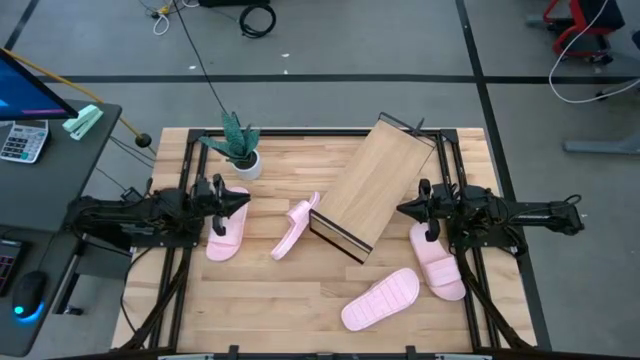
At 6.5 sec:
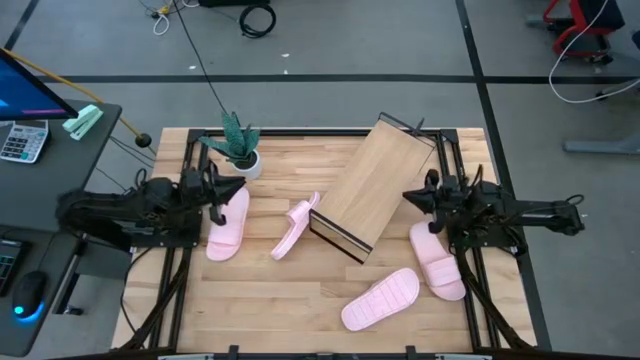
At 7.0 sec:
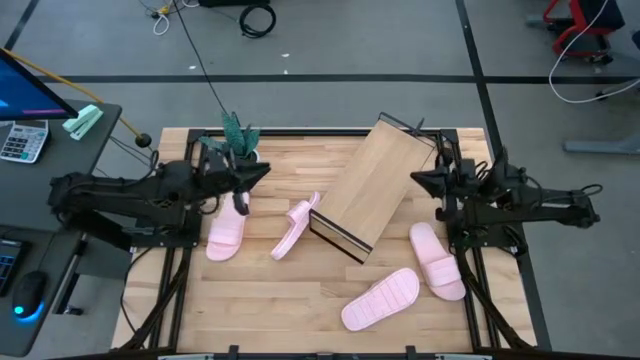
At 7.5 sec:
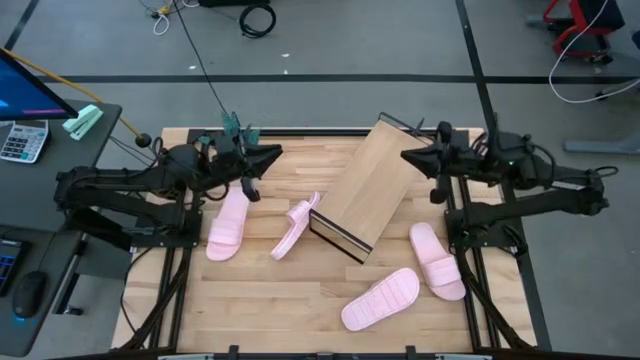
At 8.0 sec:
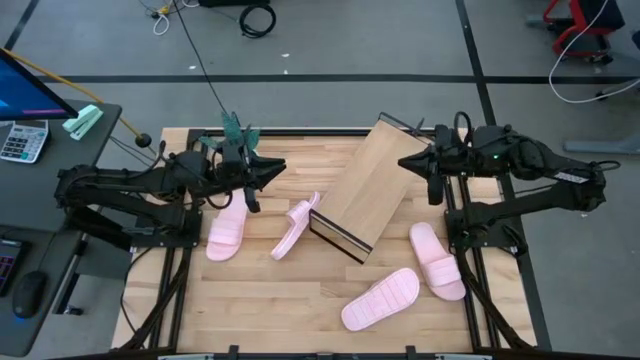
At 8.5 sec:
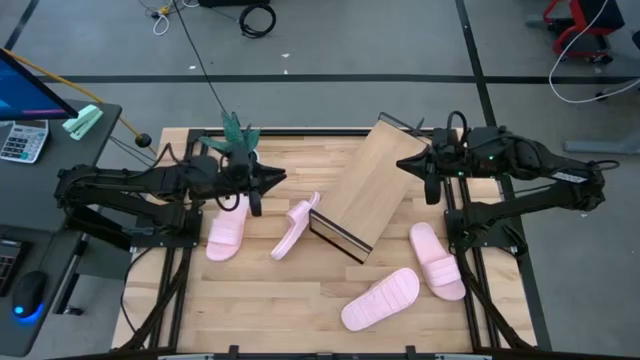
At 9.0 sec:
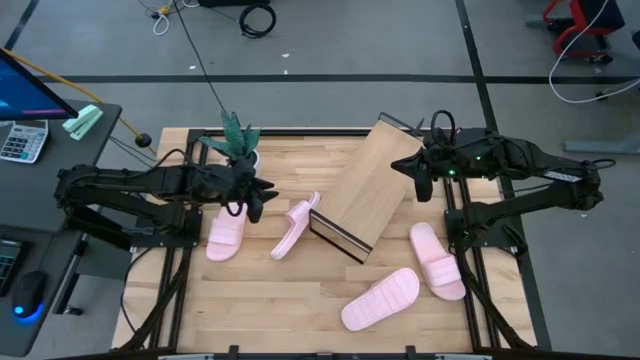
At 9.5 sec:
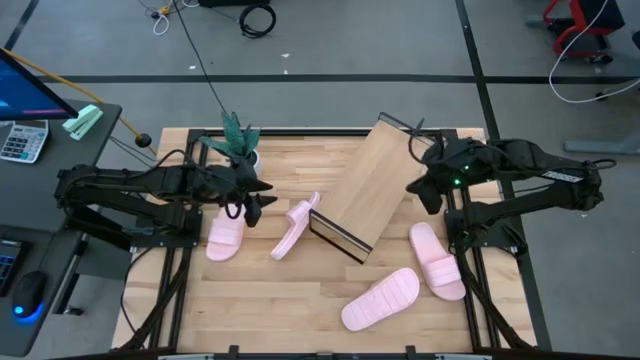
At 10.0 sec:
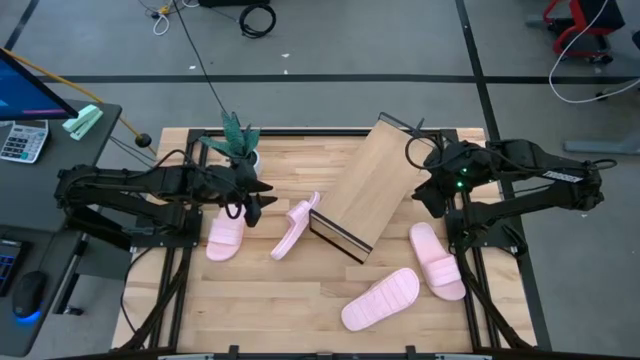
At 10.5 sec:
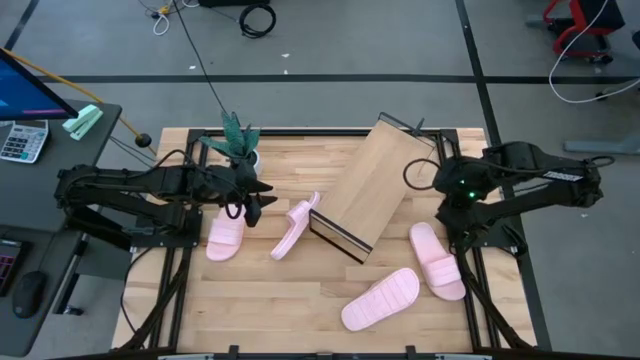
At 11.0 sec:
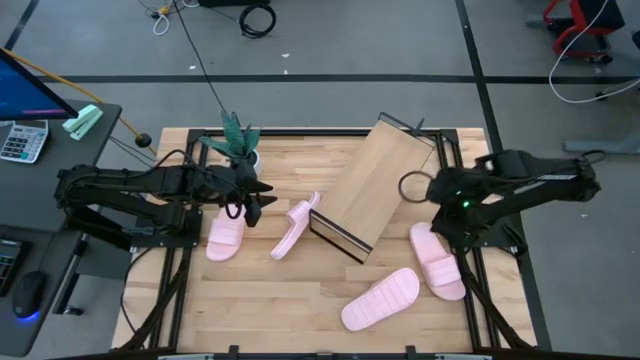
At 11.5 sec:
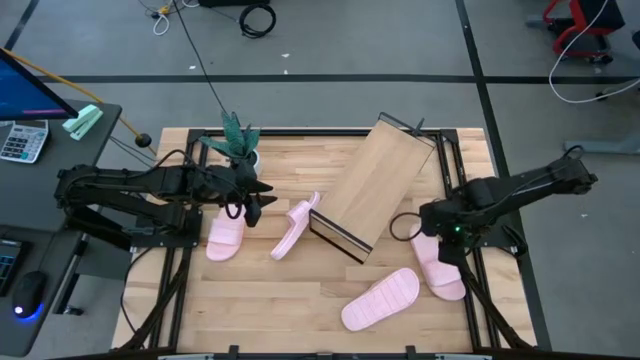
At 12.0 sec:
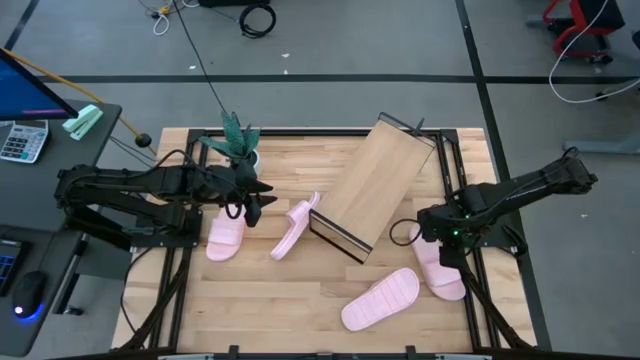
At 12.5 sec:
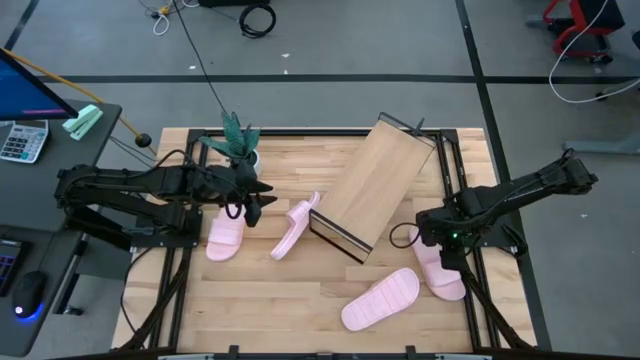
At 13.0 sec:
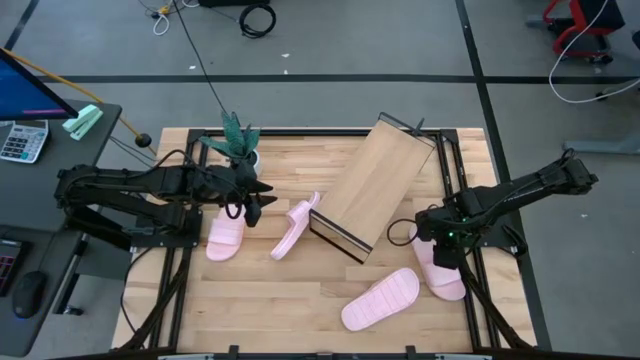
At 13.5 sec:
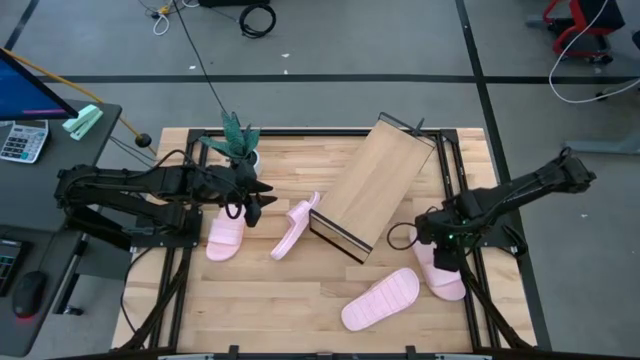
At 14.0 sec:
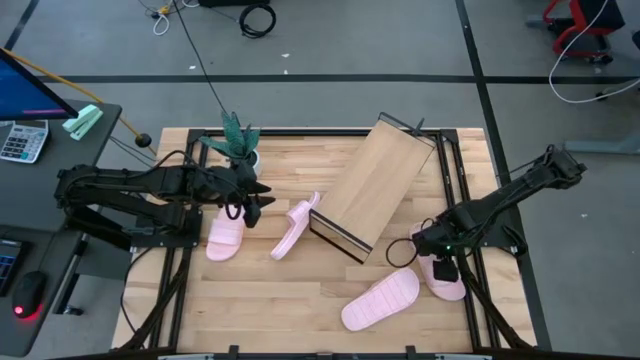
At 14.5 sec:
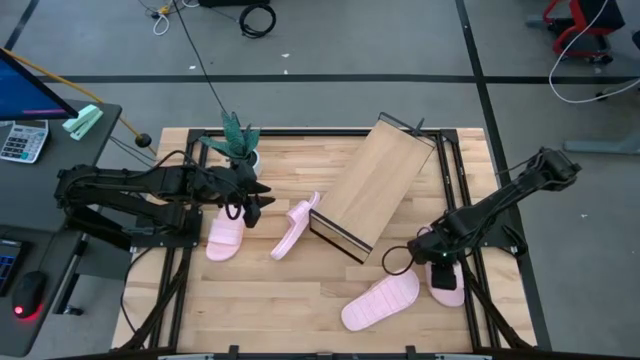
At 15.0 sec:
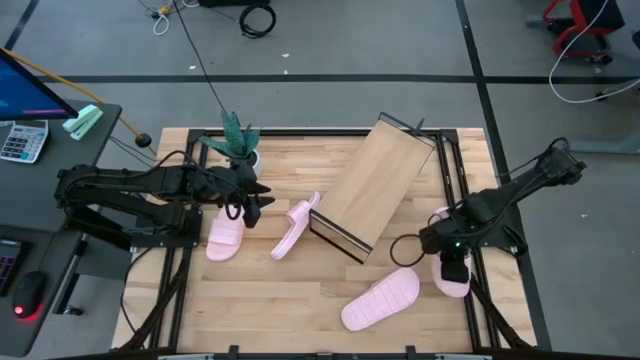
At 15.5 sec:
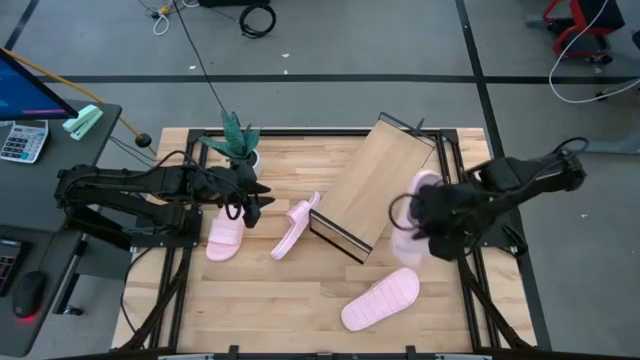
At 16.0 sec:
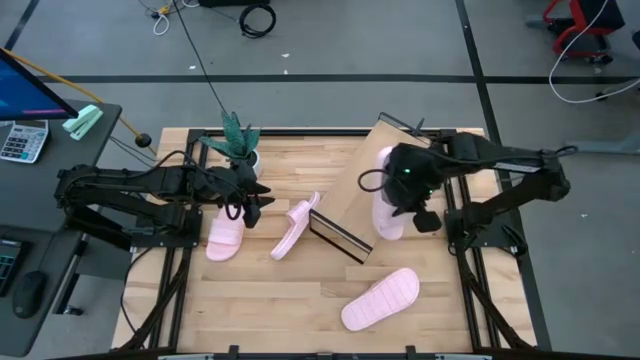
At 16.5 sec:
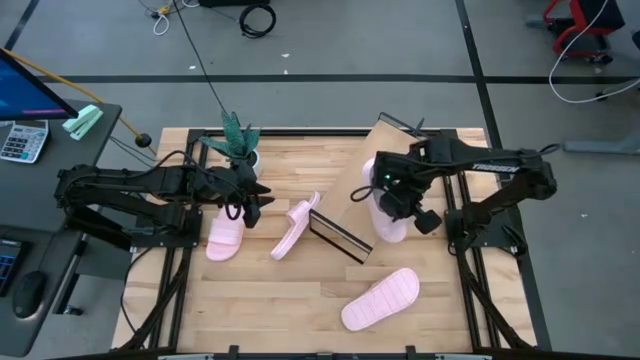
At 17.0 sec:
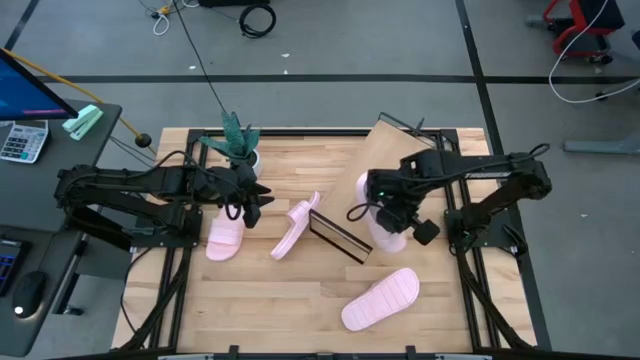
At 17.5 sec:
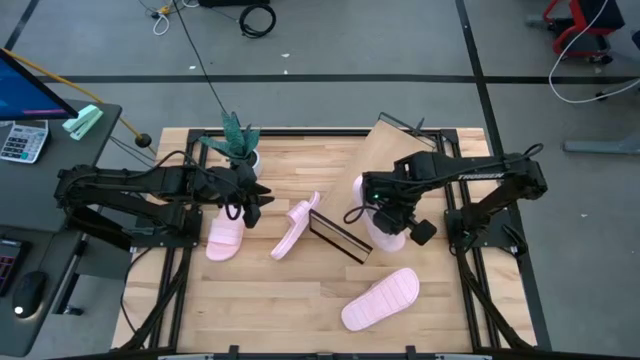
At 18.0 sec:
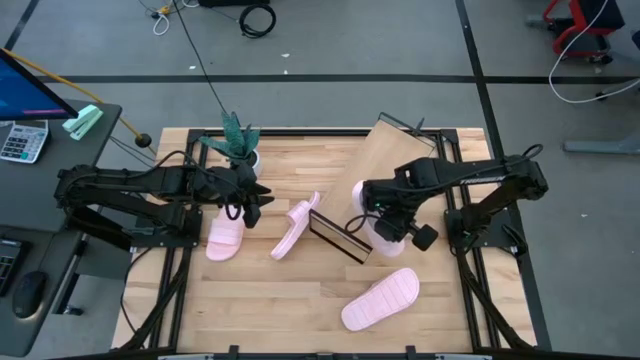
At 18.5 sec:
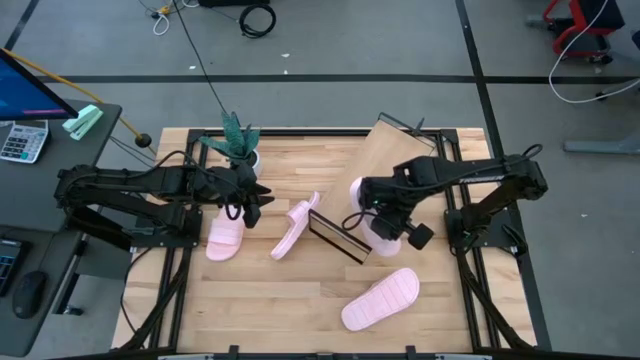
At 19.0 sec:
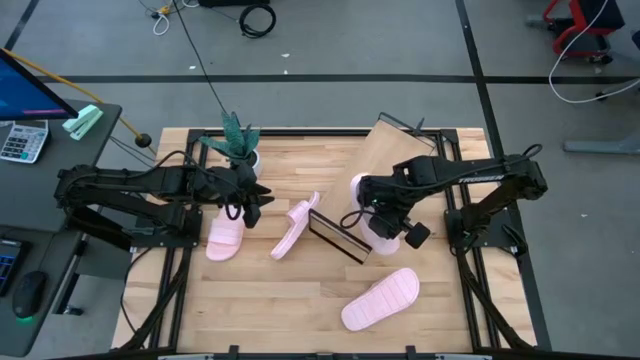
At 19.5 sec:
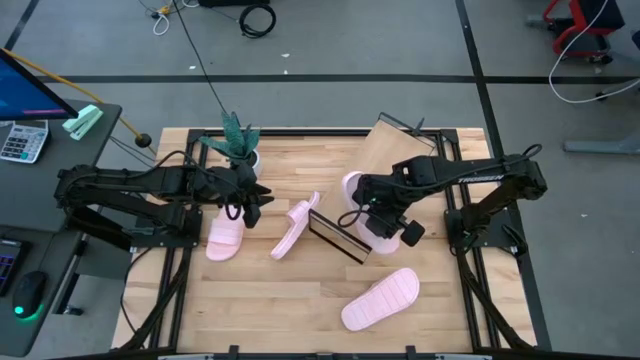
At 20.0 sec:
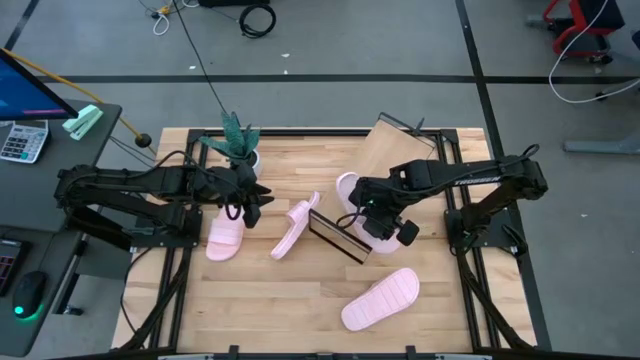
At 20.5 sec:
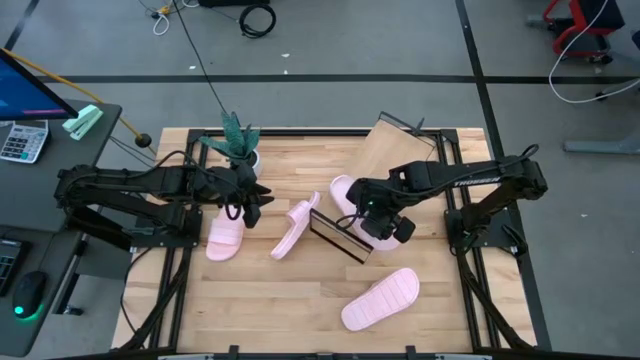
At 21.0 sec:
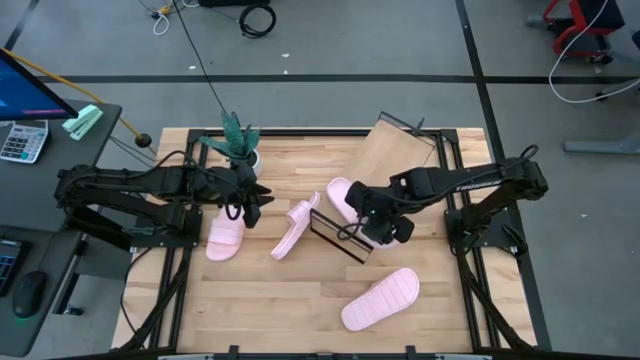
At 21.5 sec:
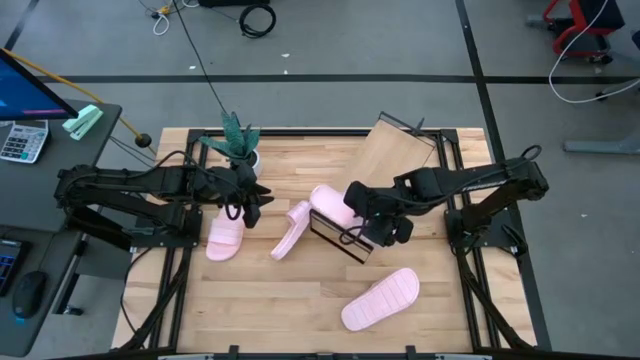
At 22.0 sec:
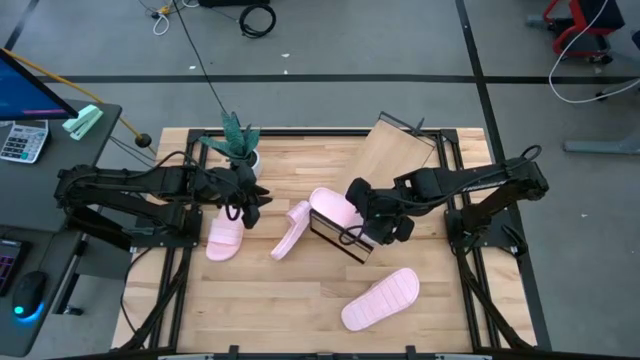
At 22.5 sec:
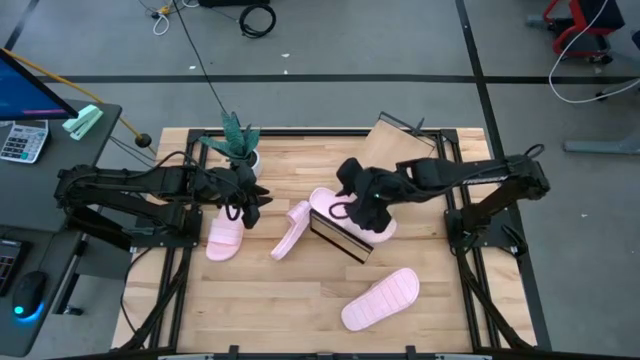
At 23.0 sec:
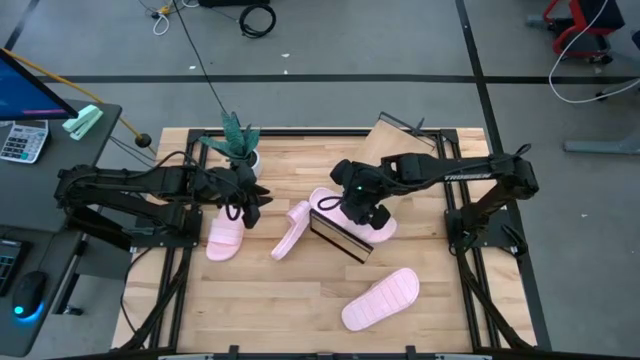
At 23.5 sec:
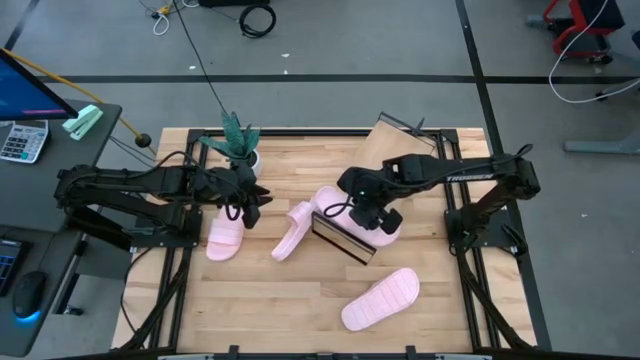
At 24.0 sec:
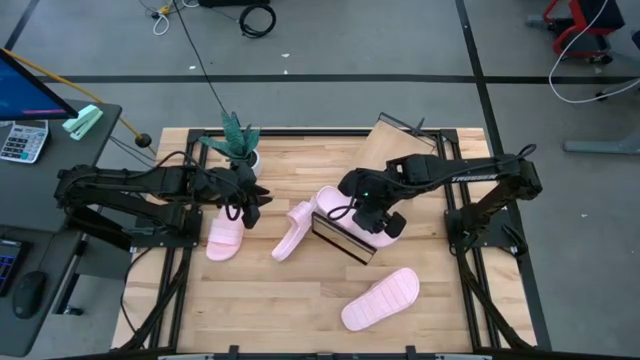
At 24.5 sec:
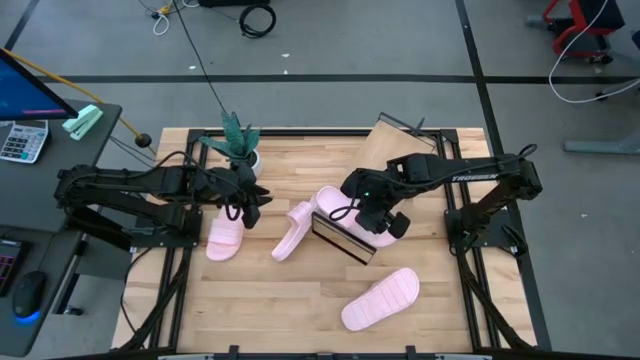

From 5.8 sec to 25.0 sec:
Task: Pick and place slides into the shelf
Put the pink slide on the shelf
